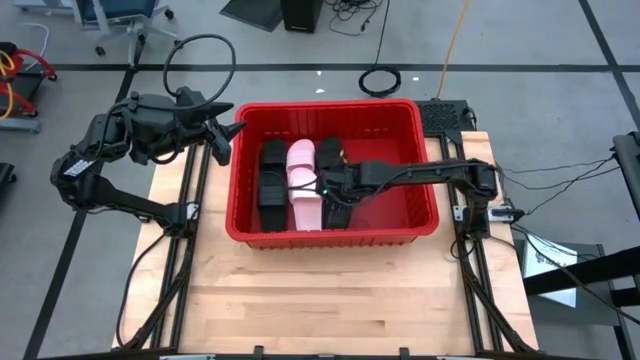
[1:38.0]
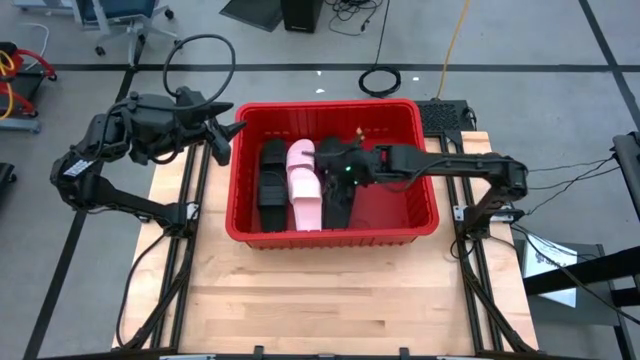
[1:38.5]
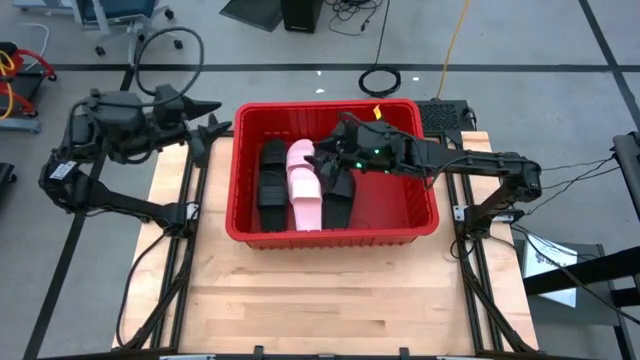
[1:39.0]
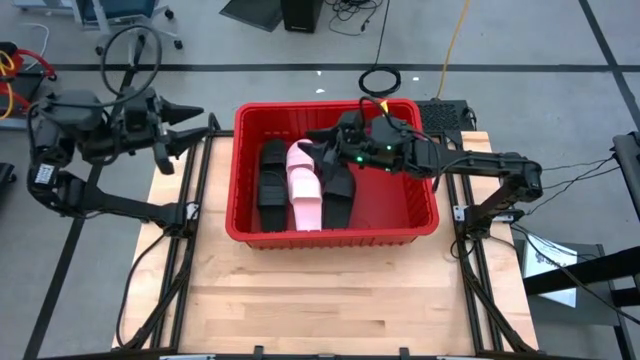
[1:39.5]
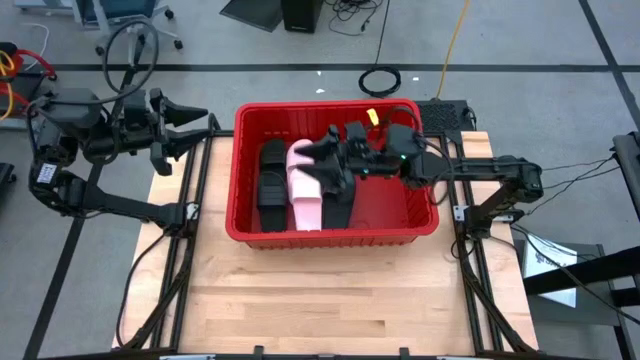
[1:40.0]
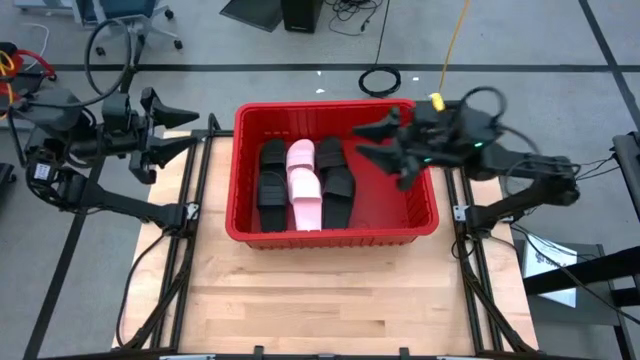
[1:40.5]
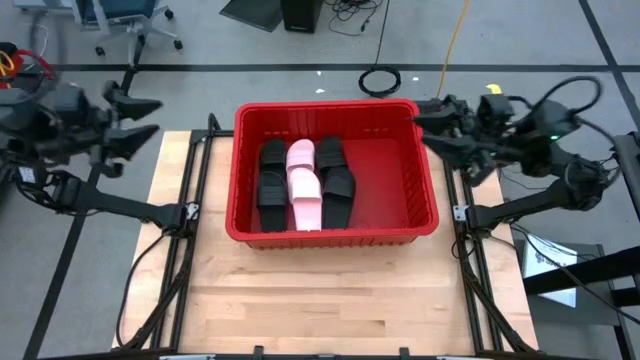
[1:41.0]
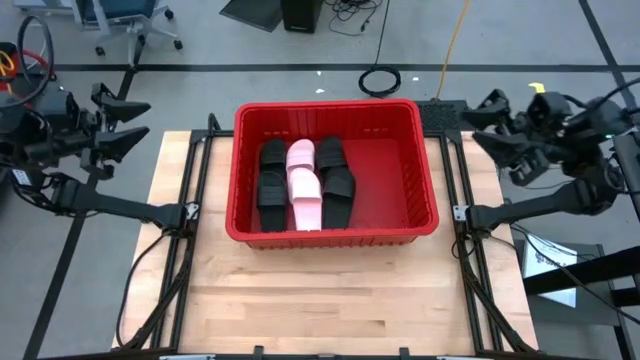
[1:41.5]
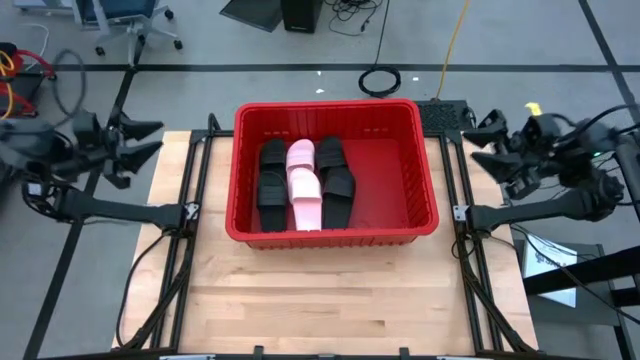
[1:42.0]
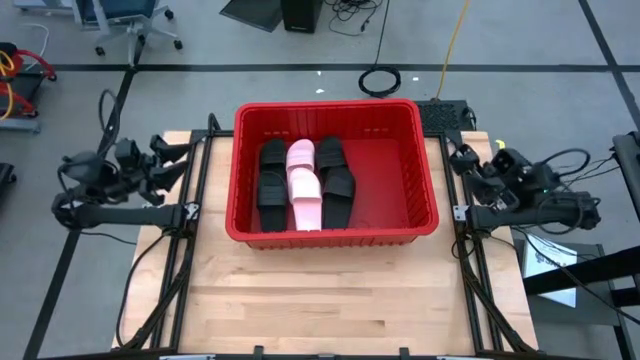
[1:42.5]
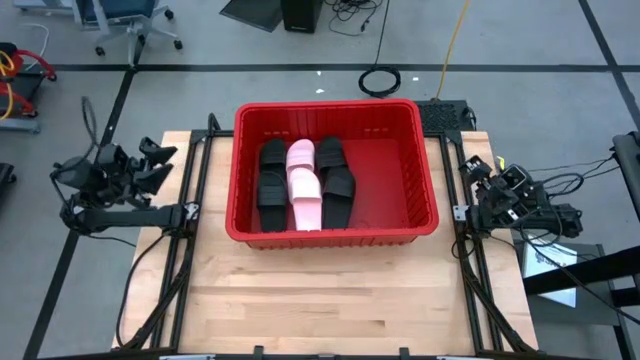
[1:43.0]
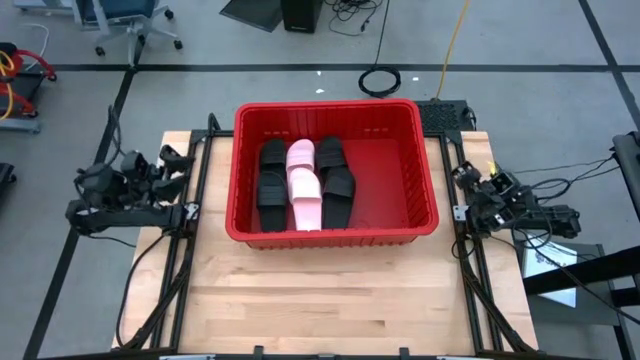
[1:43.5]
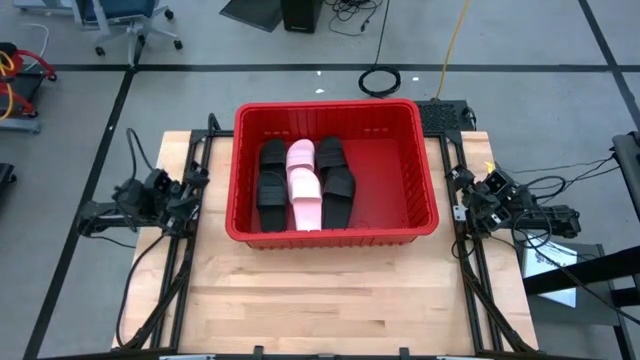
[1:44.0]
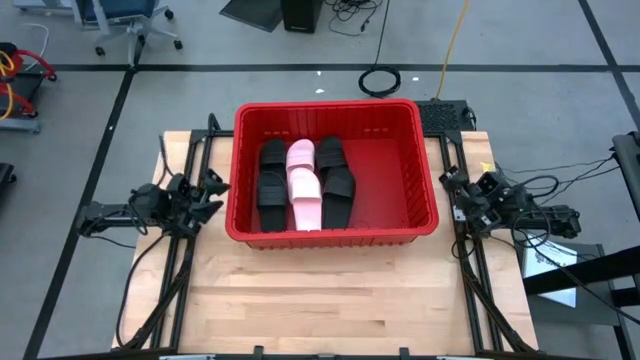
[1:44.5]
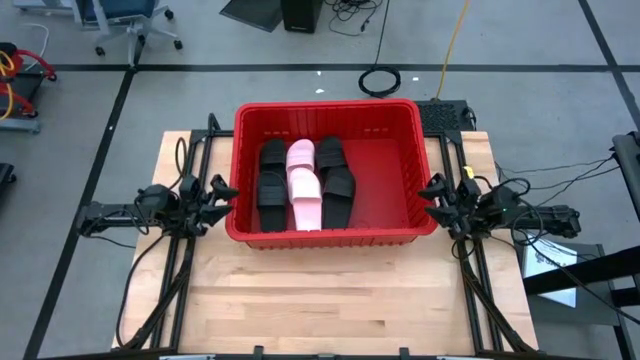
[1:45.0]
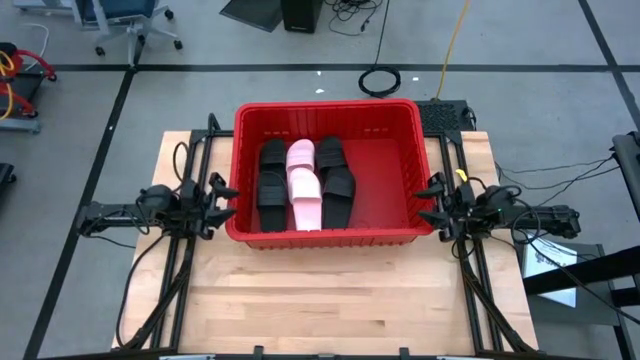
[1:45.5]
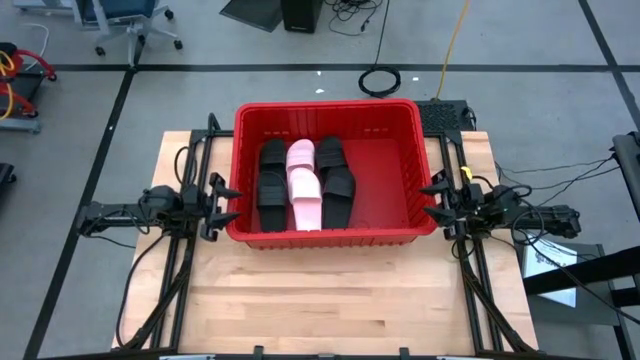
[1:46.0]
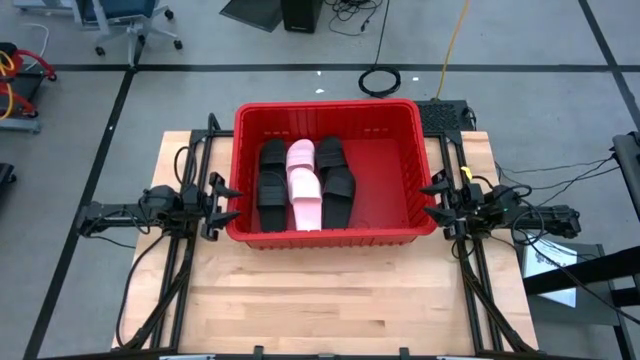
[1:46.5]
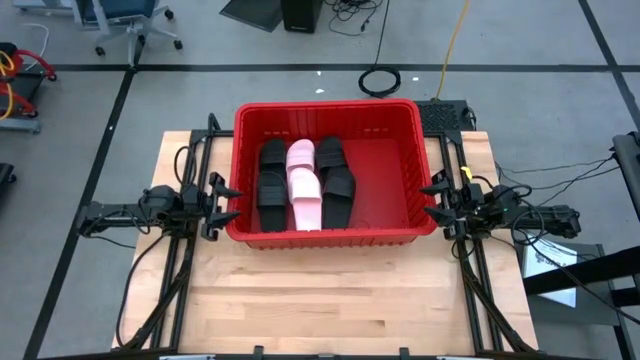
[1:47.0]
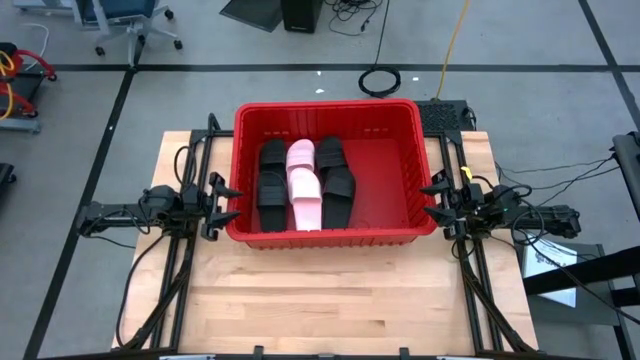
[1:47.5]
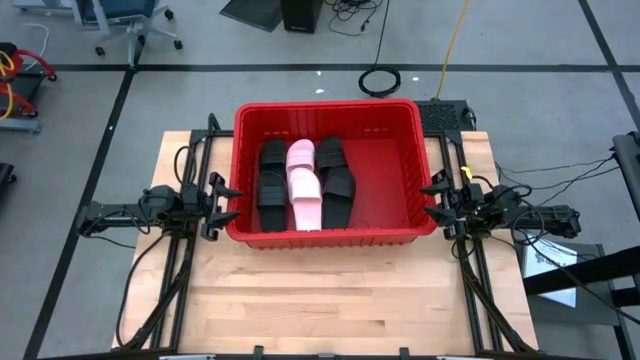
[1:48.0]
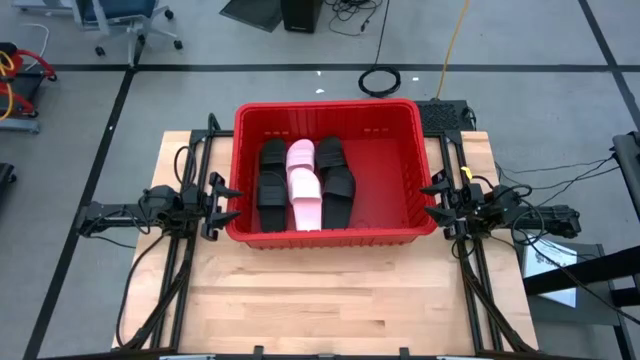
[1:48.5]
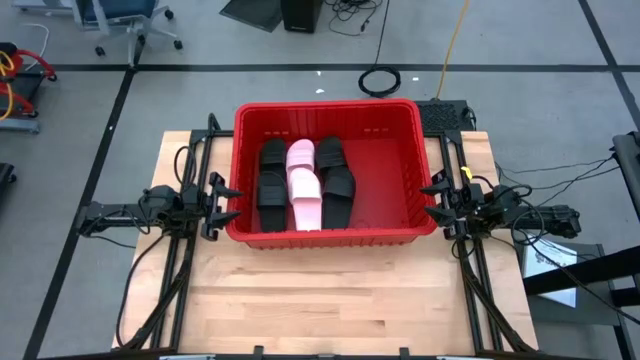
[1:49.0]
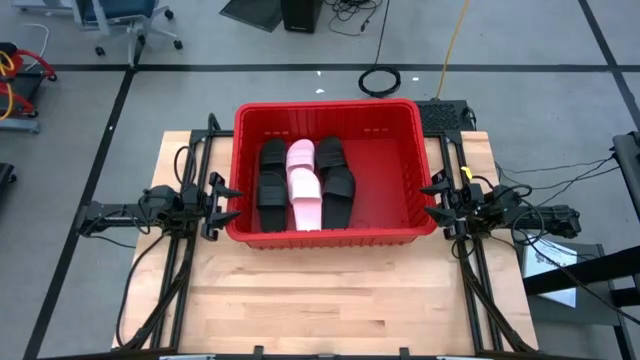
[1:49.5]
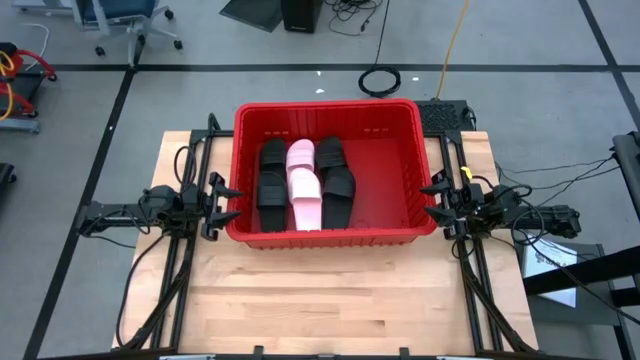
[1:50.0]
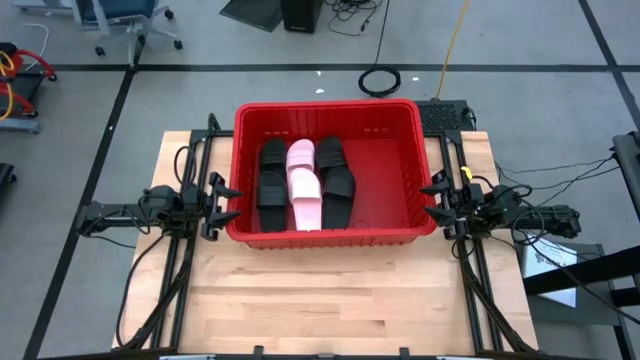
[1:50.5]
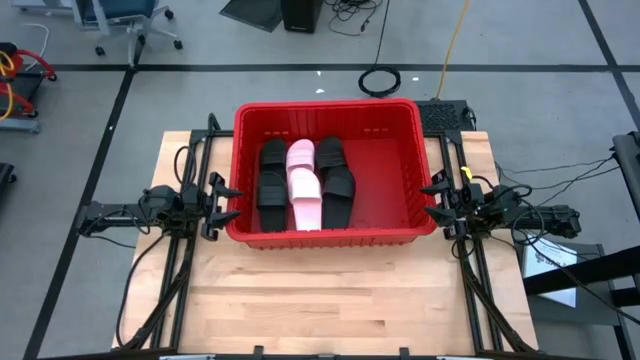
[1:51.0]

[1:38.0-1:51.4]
Task: Pick and place slides into bin
Return to Home Position
